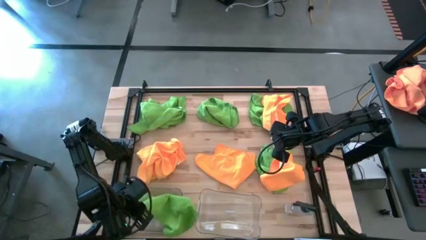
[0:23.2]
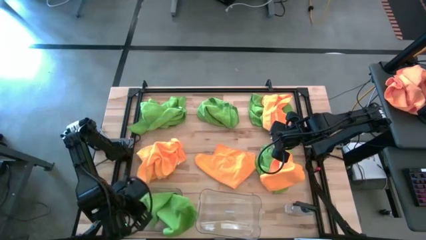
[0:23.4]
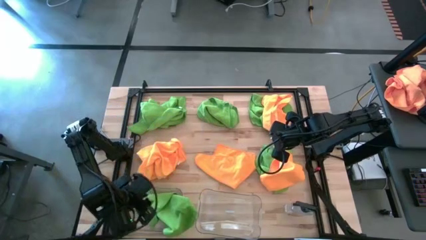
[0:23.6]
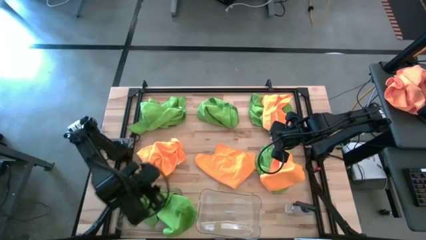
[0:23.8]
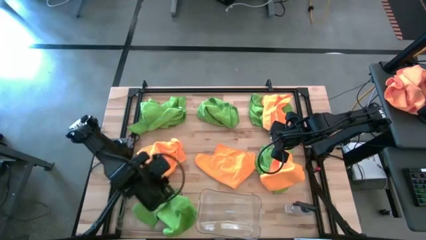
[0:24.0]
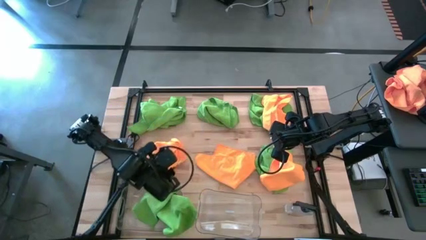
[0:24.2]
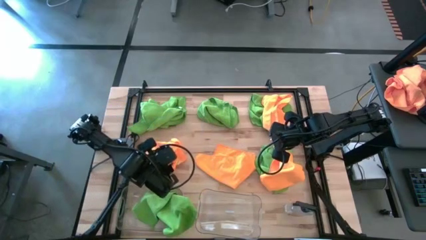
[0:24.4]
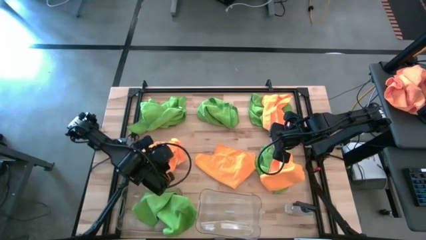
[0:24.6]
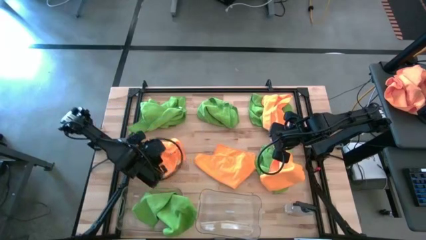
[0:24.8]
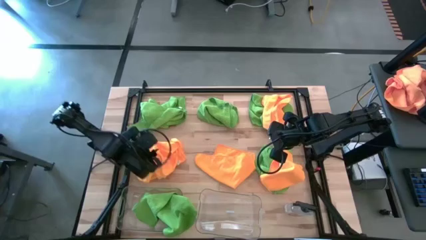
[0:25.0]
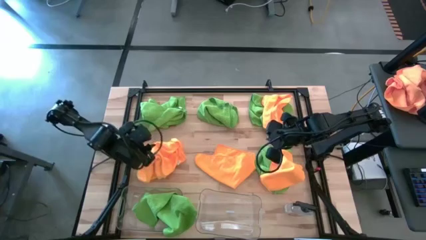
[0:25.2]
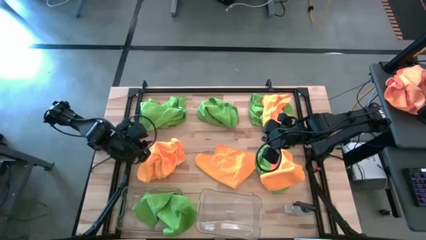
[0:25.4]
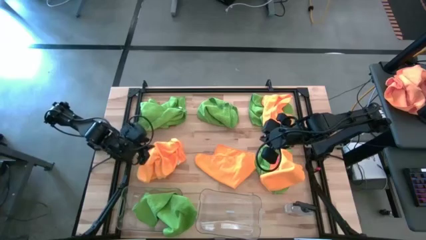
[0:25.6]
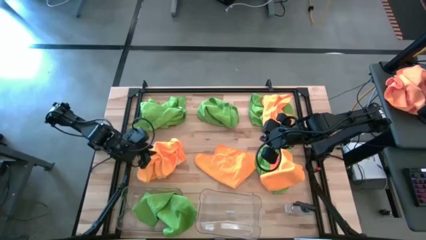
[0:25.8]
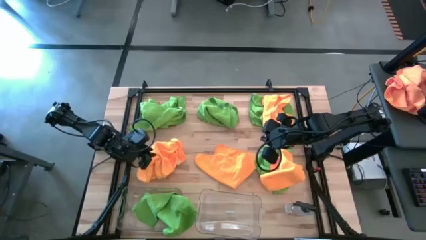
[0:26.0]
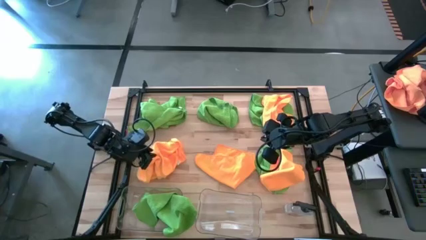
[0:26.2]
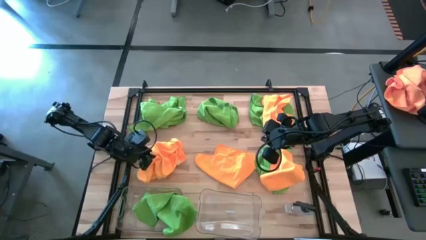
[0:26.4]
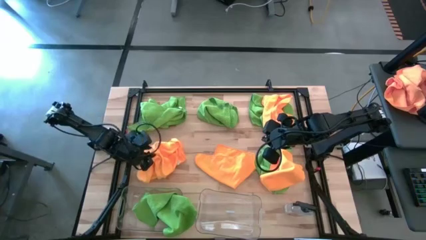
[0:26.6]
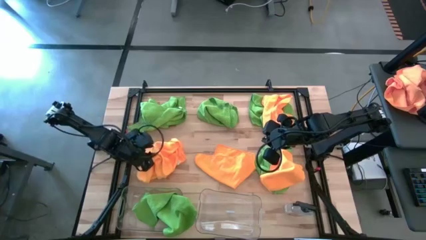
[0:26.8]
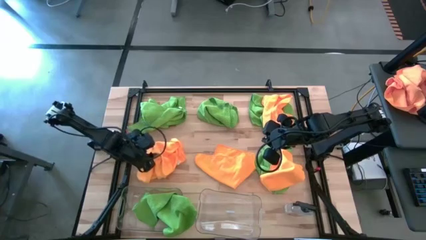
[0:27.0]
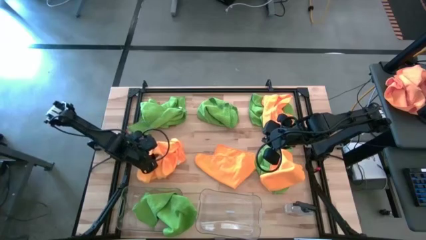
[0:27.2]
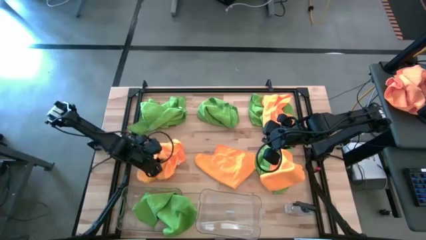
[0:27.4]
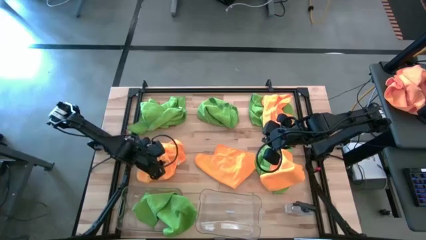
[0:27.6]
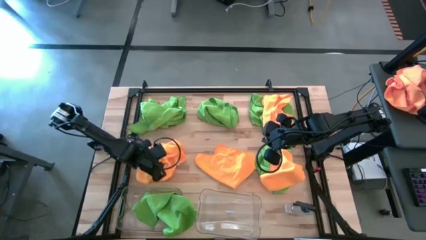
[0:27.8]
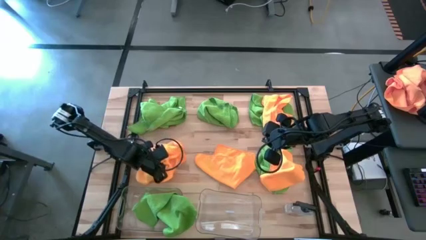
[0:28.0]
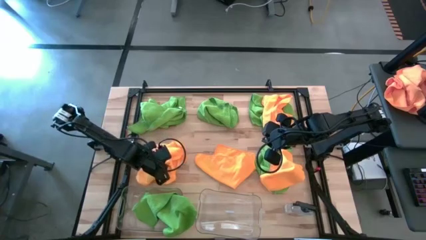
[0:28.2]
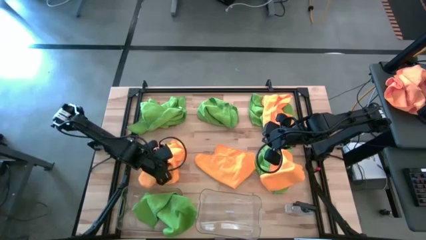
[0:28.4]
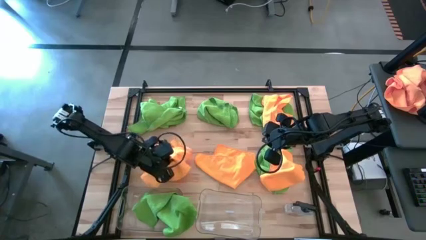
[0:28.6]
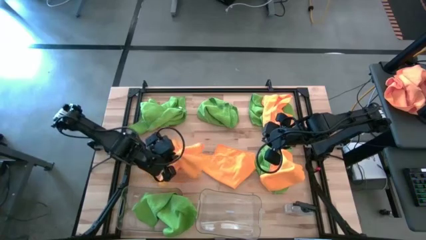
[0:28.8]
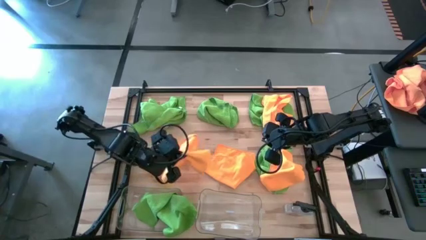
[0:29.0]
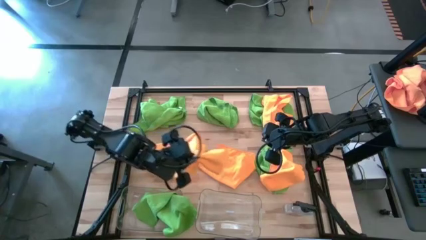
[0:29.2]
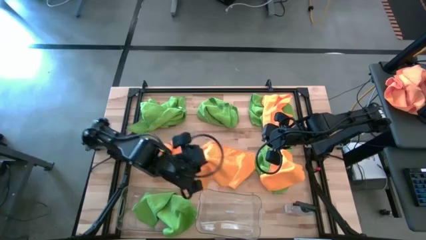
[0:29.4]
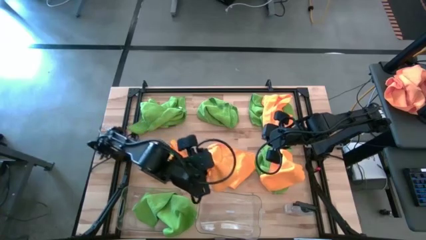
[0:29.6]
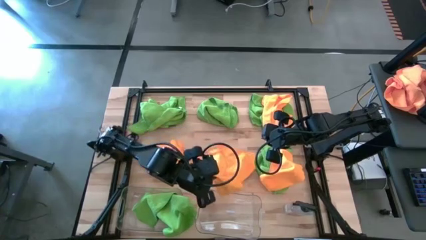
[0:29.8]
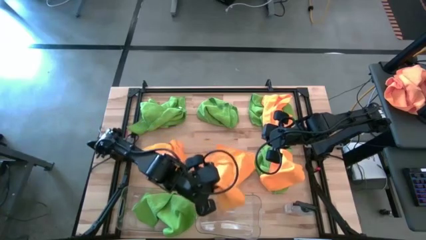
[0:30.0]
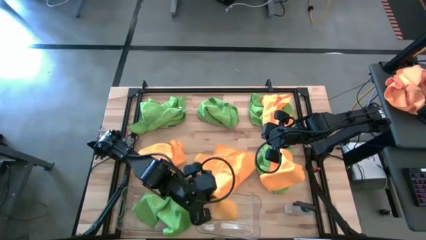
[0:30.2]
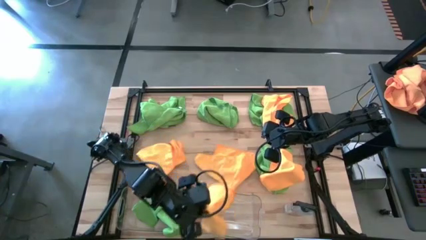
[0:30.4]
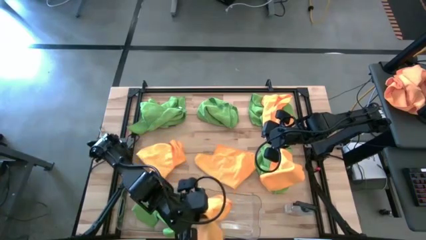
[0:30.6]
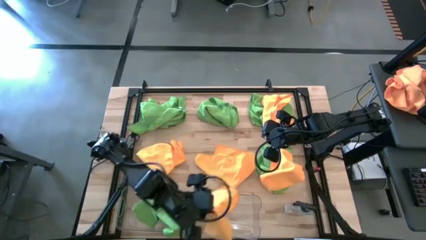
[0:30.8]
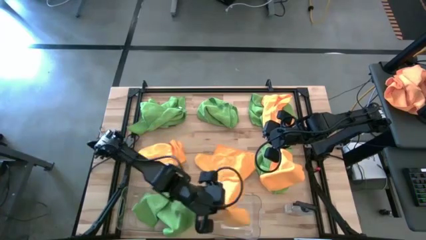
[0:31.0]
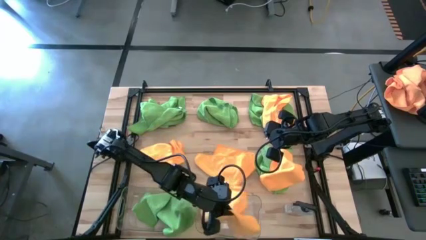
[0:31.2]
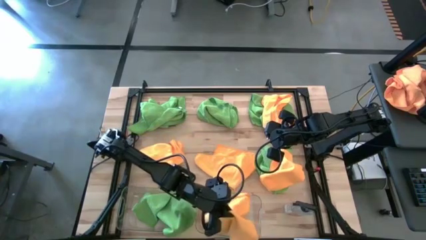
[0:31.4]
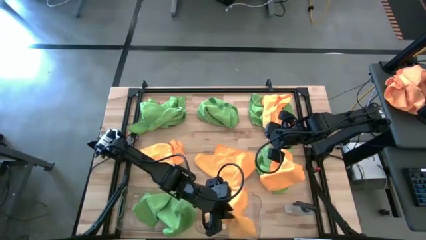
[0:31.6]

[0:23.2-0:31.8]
Task: Sort microfiber towel by color & place in baskets
Put the orange towel into the right transparent bin

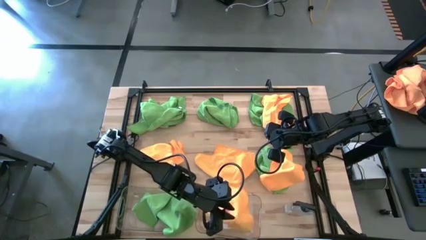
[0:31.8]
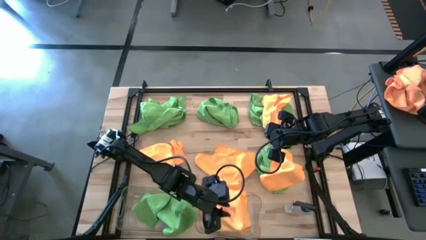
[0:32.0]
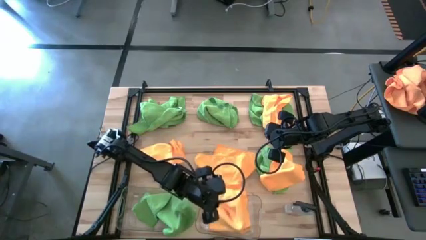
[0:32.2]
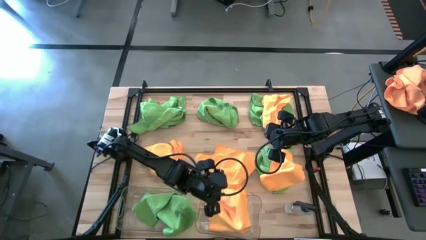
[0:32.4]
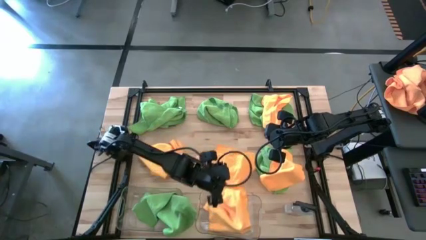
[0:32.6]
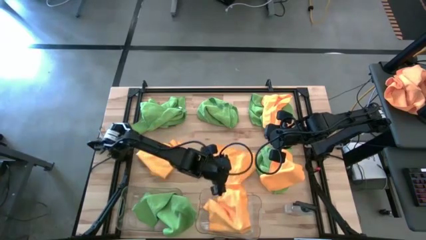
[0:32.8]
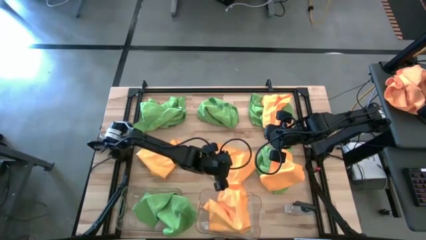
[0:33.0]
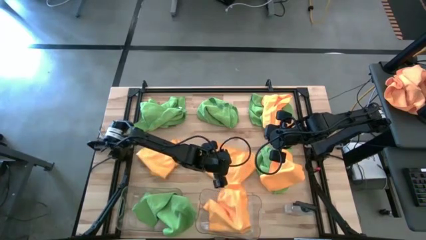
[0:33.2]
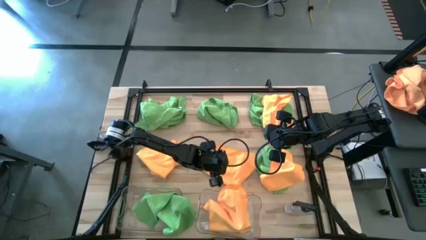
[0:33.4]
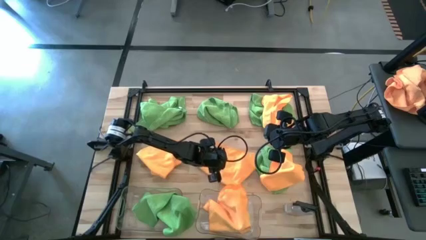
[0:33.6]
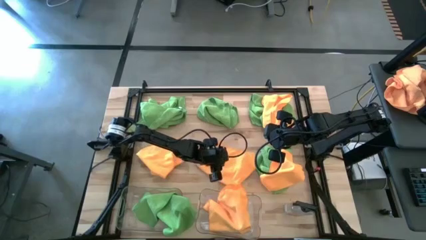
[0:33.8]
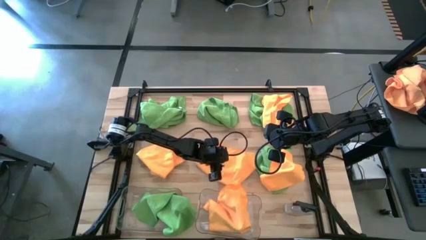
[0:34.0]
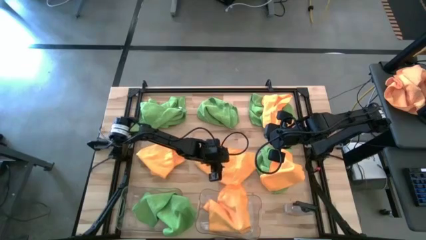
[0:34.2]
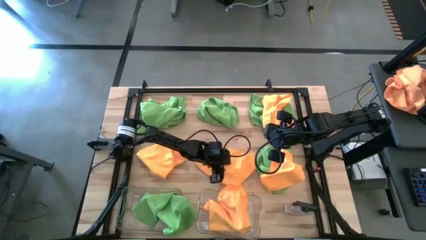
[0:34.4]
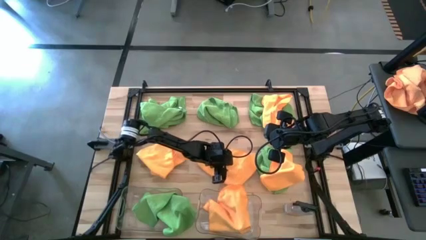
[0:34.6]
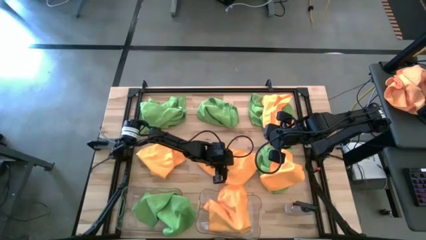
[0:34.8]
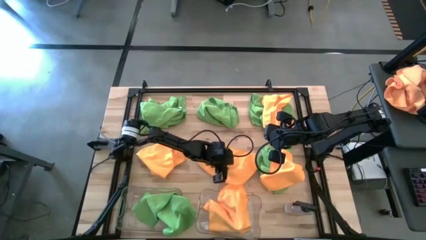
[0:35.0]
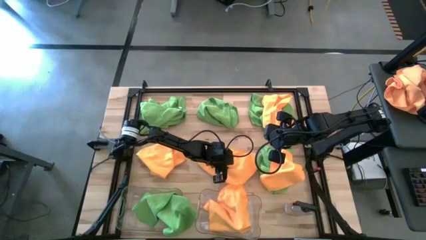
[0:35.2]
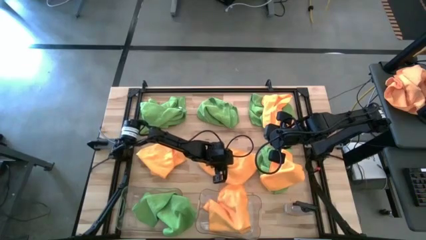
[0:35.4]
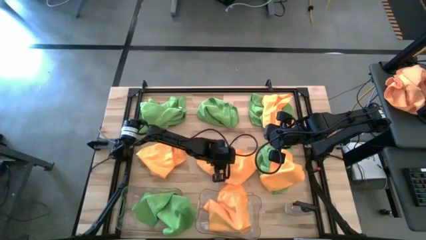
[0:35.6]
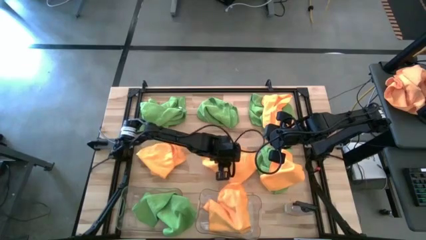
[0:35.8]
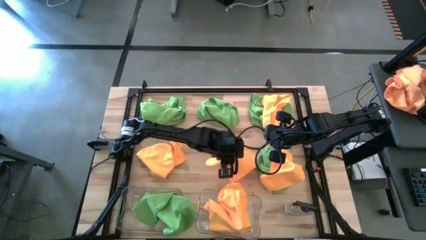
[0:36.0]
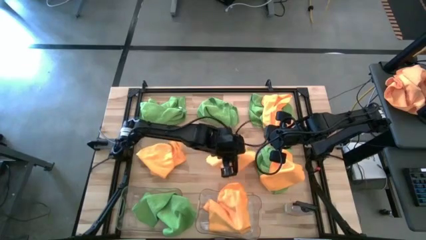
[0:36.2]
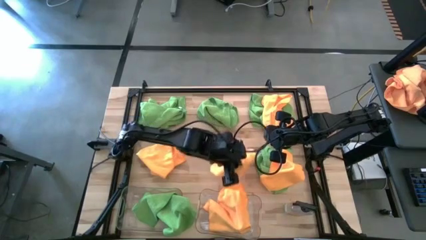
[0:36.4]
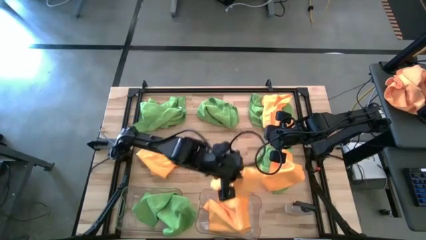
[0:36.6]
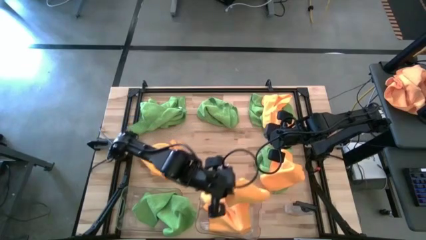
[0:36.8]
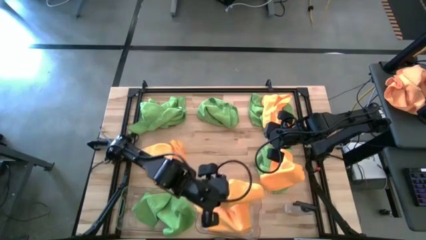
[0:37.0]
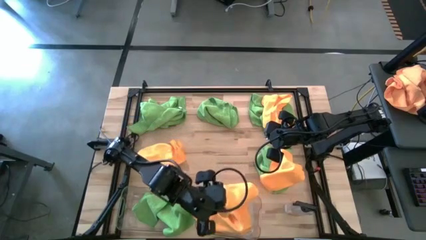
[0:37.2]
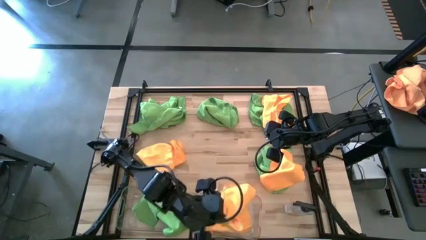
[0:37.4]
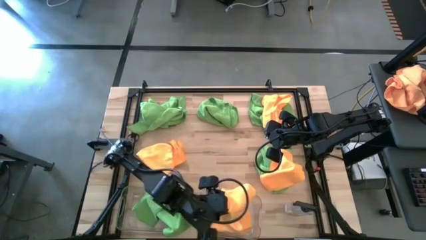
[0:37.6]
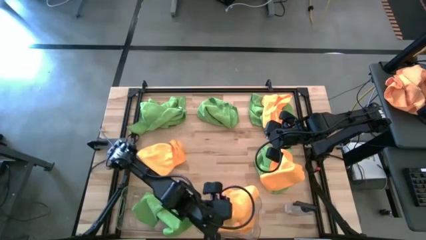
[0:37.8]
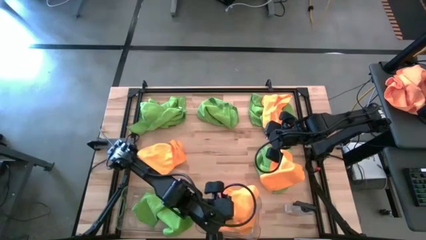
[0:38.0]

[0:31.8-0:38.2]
Put the orange towel into the right transparent bin
